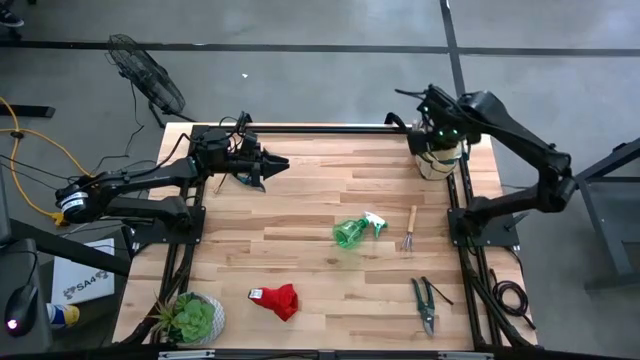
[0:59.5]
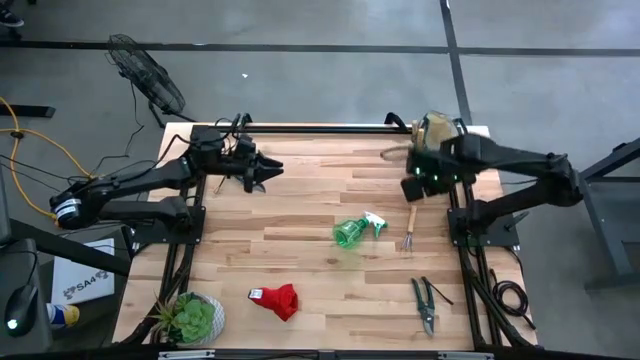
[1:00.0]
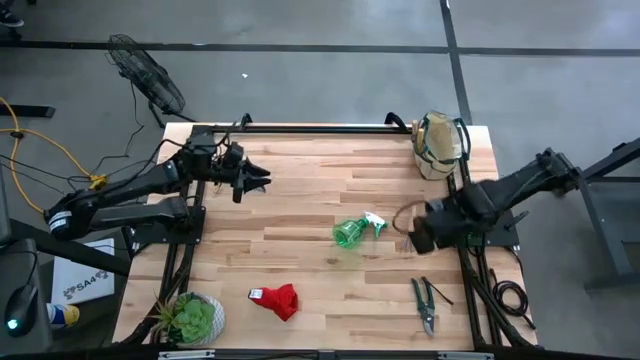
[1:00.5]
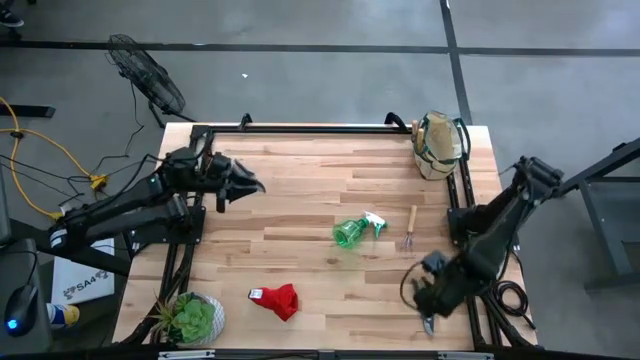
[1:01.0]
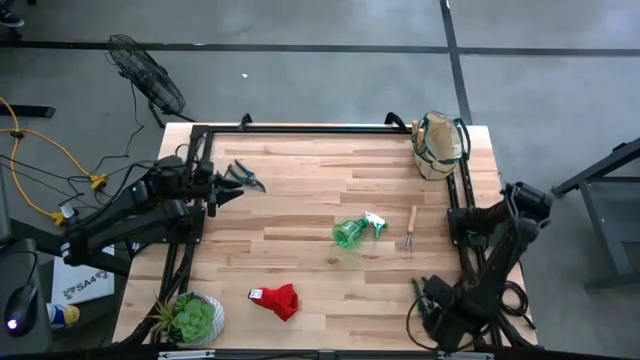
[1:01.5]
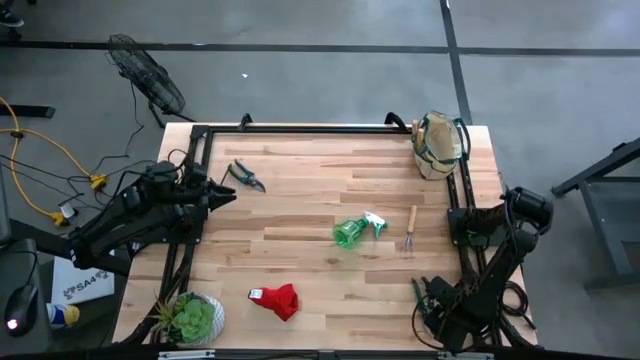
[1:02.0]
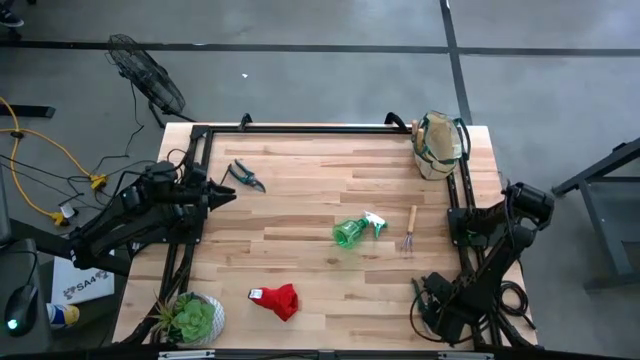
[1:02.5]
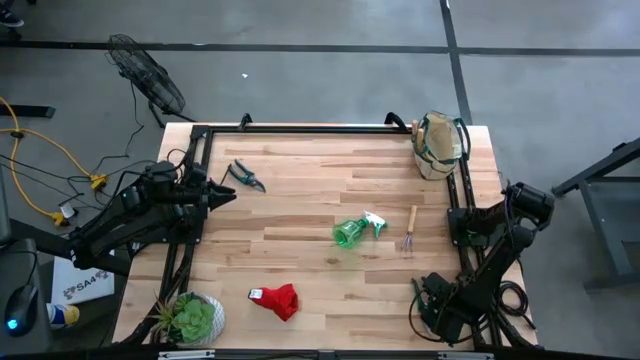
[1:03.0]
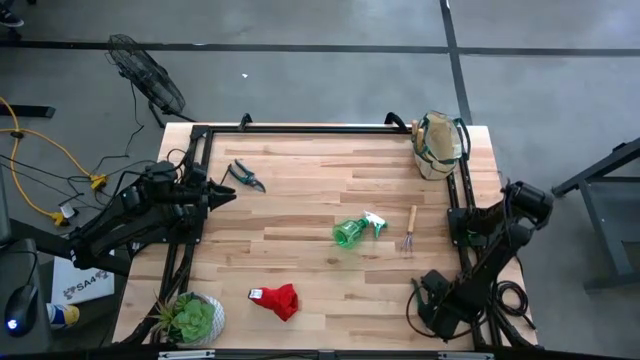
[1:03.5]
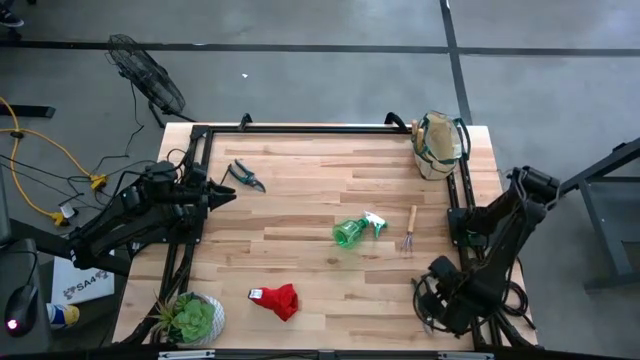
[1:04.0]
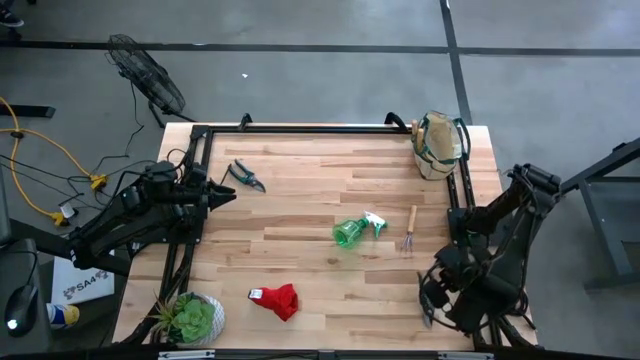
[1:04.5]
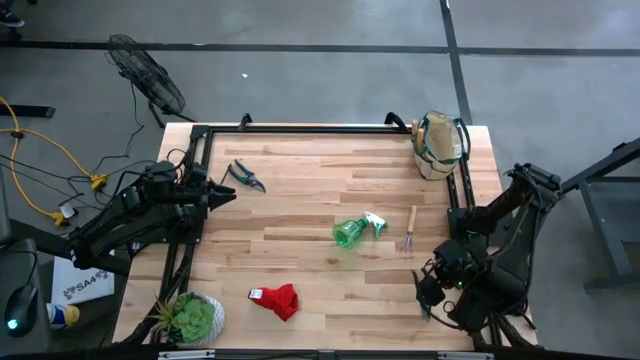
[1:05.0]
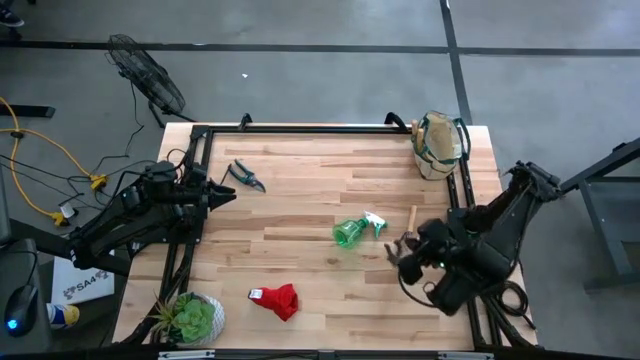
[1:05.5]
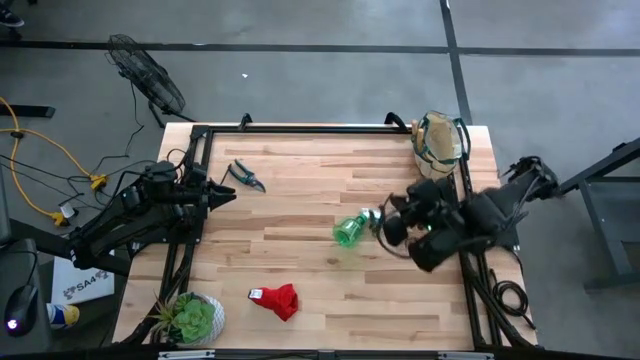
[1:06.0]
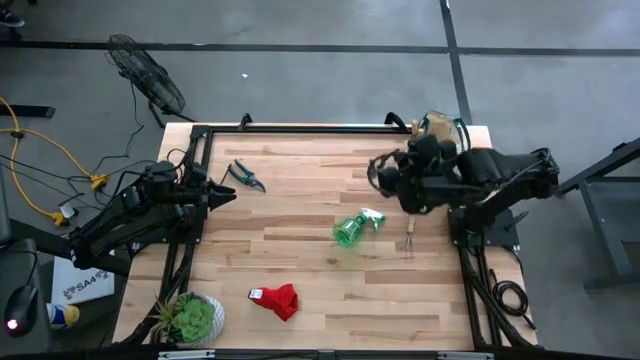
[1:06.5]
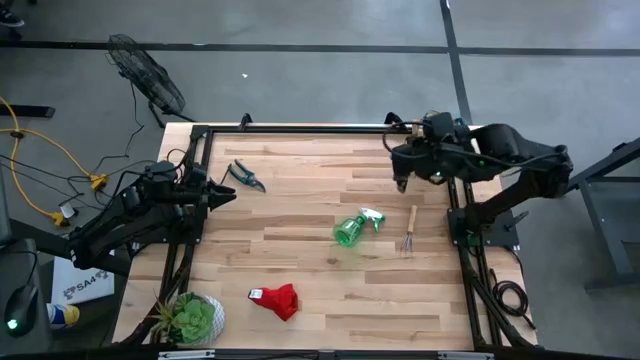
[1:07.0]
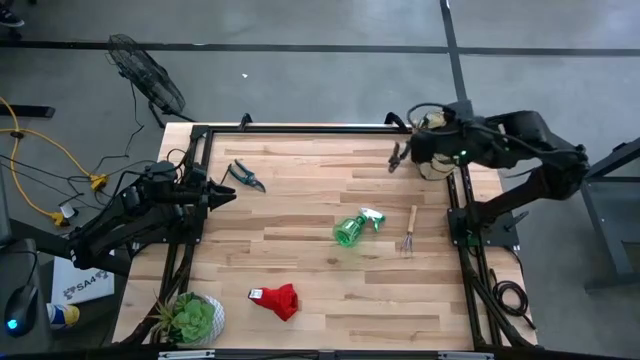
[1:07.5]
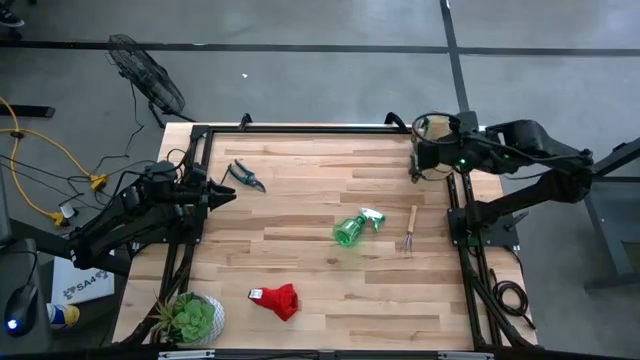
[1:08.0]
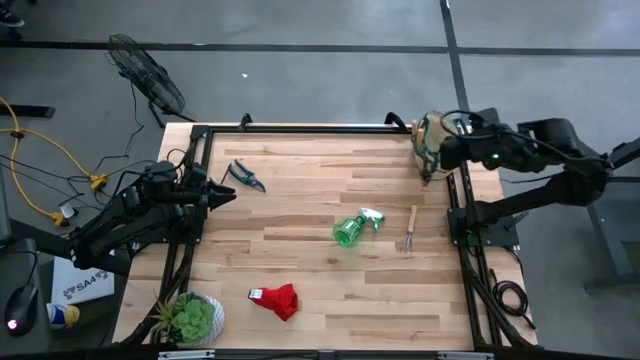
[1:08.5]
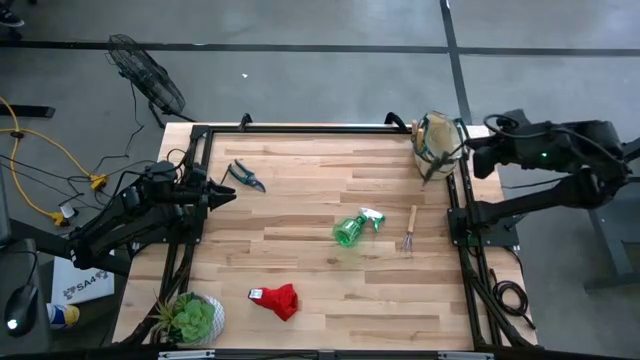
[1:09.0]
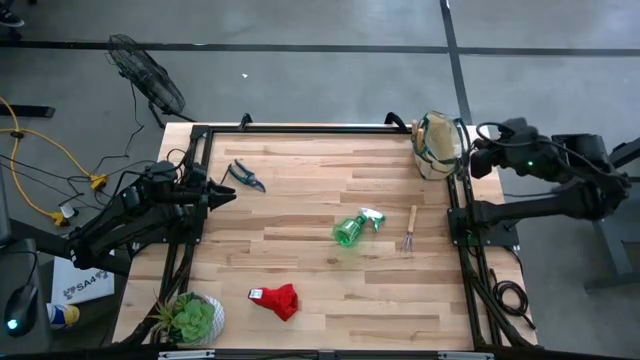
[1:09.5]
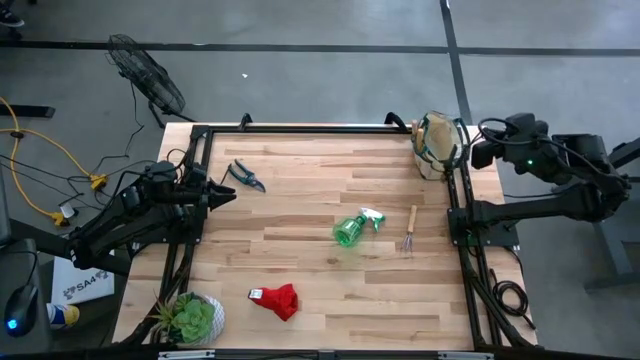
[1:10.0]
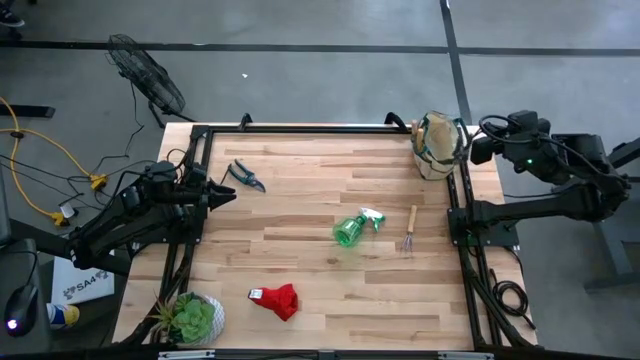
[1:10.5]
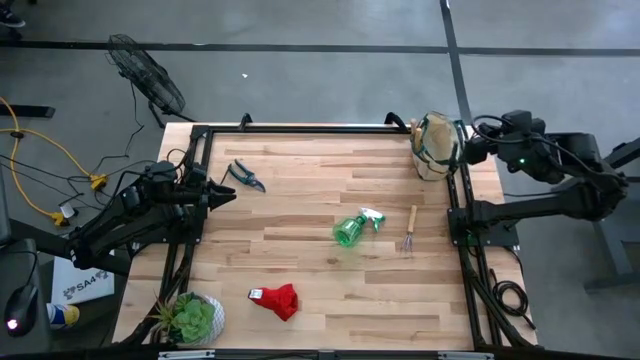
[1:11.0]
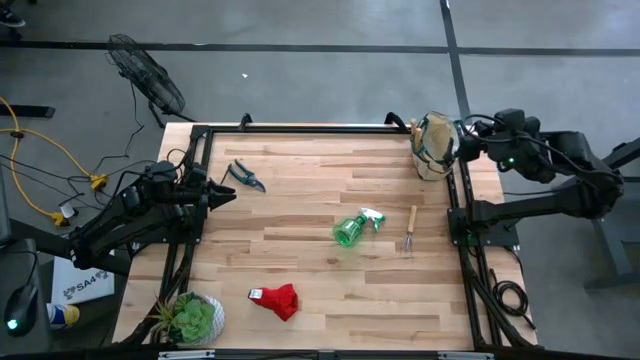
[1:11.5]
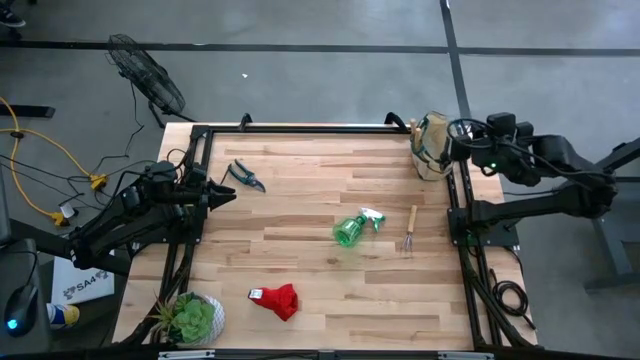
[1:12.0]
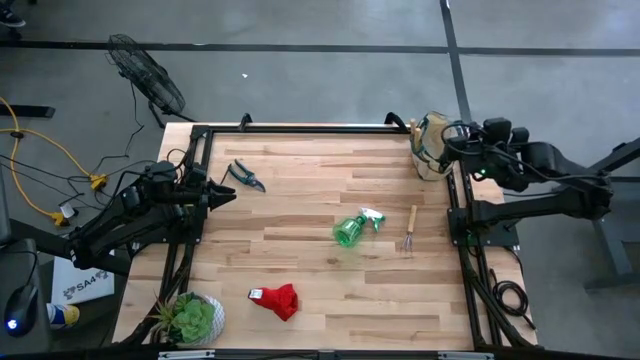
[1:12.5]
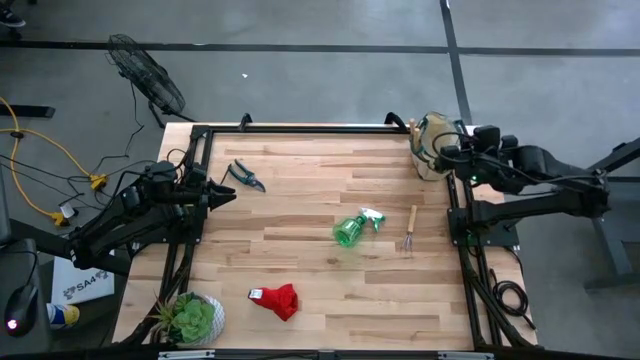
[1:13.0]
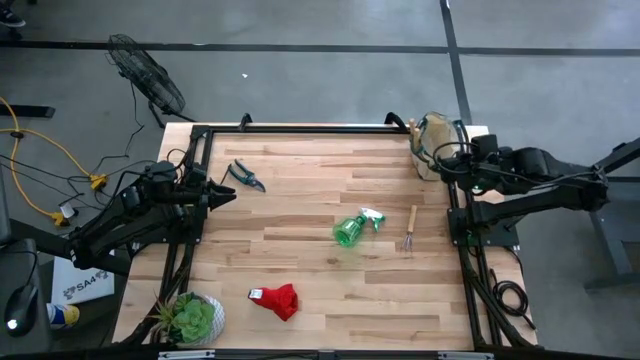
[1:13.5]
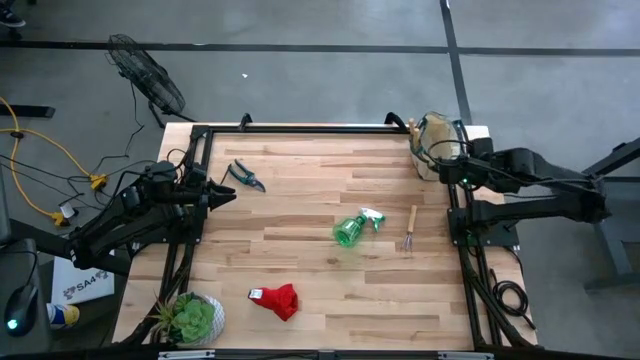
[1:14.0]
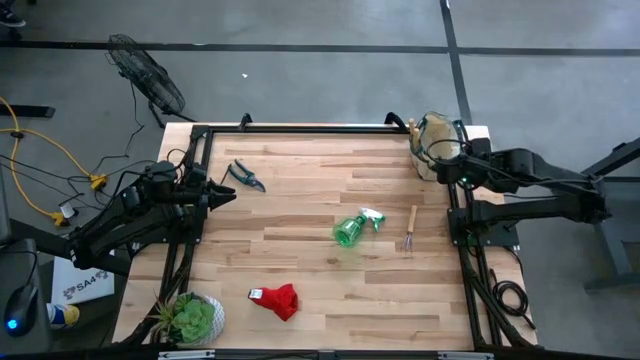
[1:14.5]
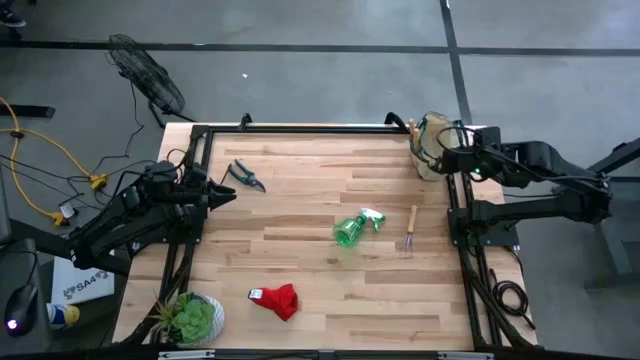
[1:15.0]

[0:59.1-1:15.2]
Task: Pick & Place Garden tools in Gardening bag
Put the right shear scissors into the gardening bag

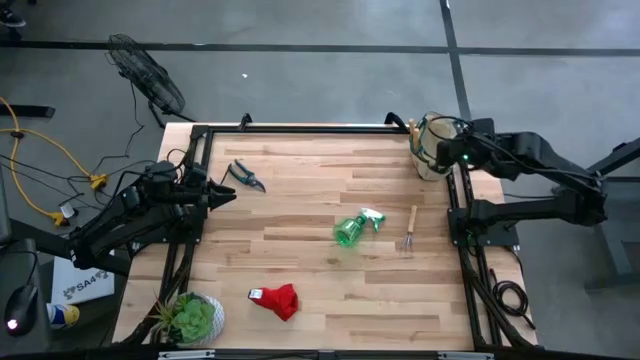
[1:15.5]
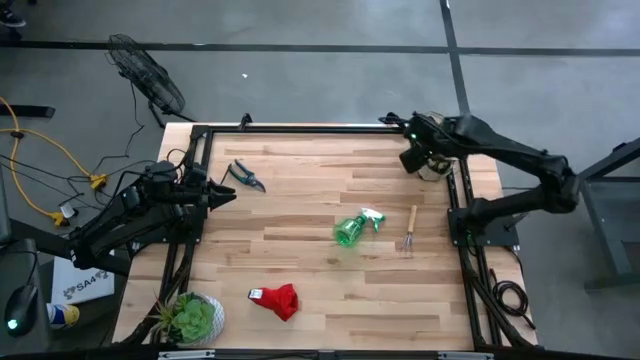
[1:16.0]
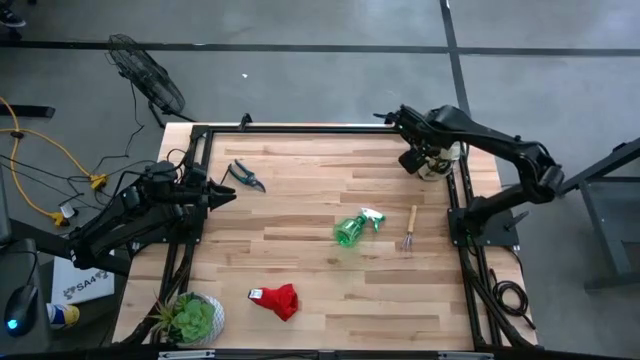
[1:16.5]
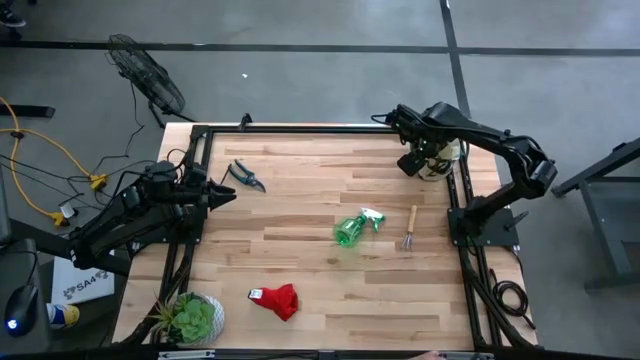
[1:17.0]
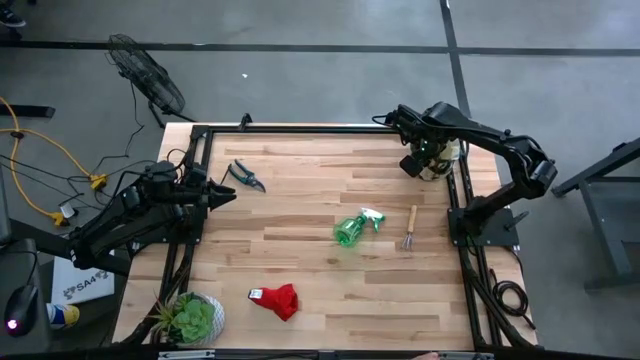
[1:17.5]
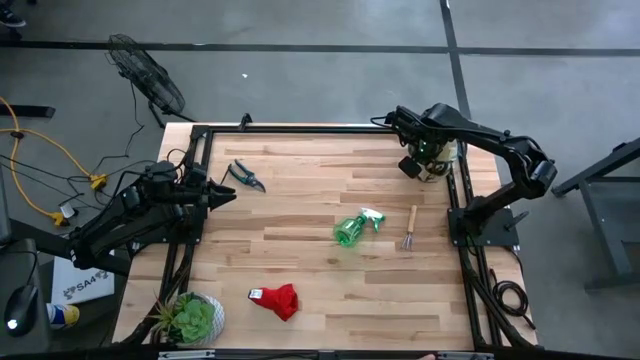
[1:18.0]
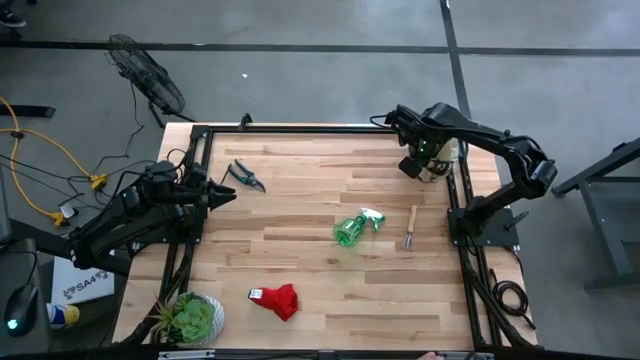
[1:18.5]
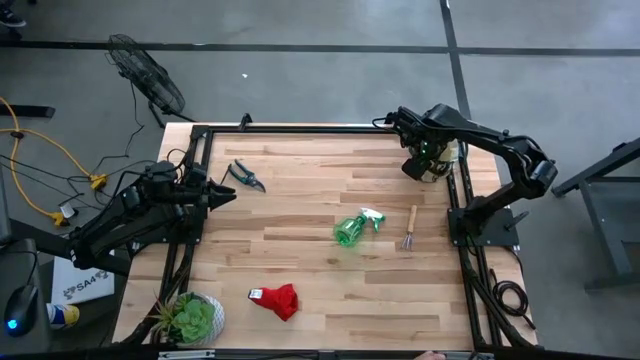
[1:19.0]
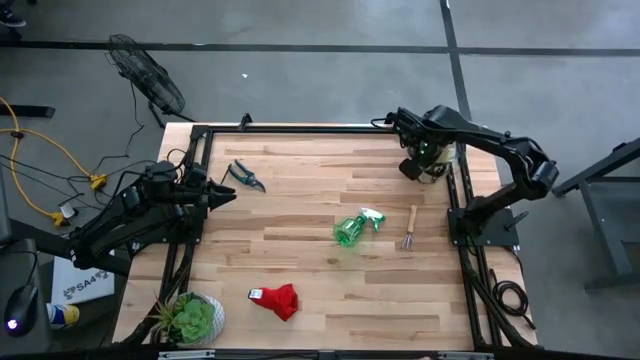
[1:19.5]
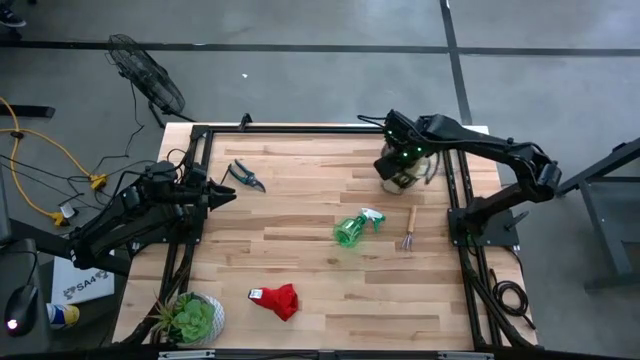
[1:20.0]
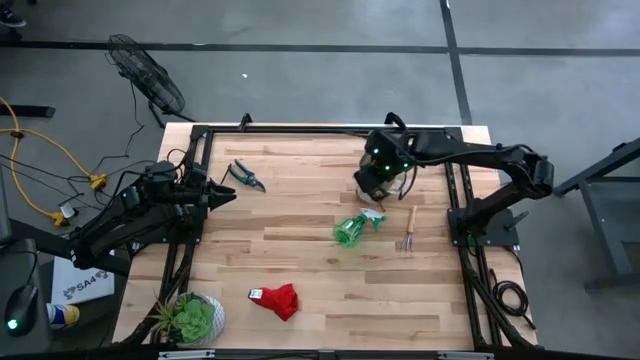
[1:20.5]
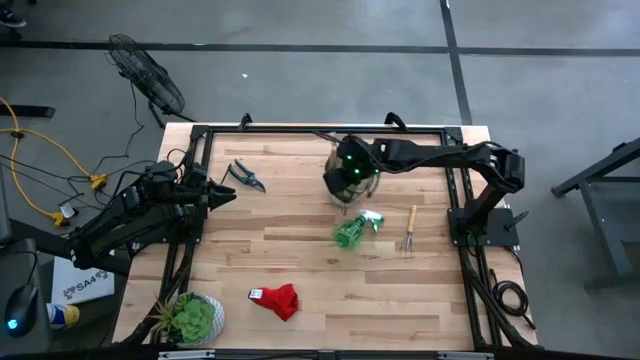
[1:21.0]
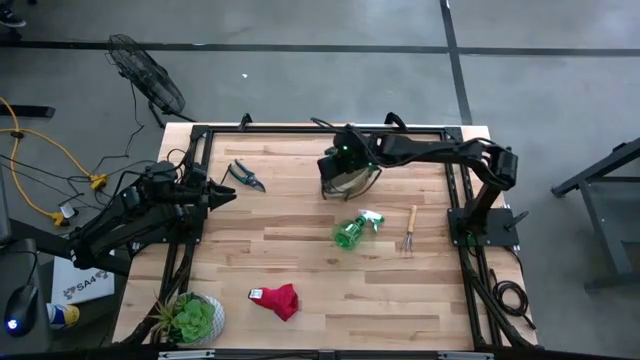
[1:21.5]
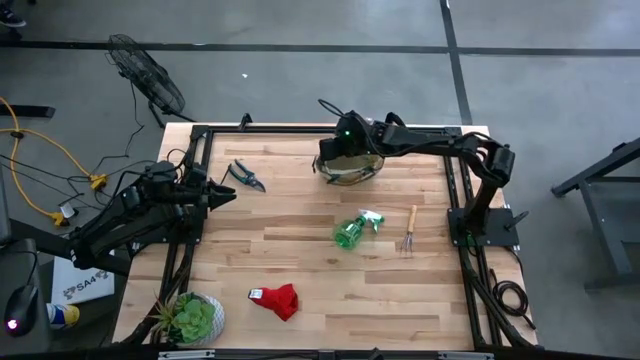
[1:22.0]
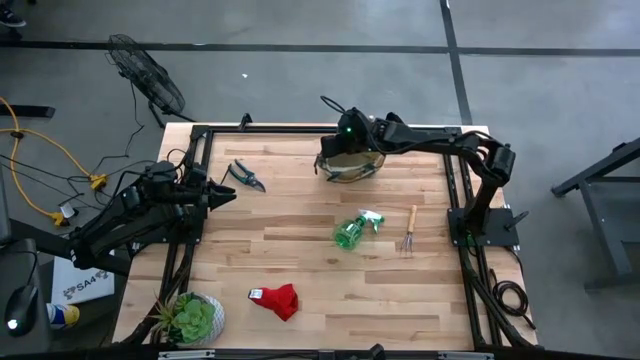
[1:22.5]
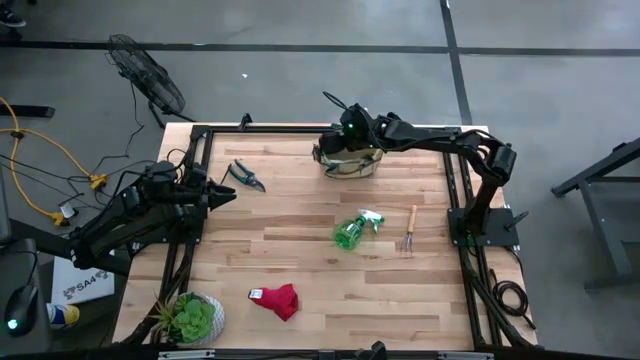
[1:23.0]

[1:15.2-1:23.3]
Adjust the gardening bag on the table
